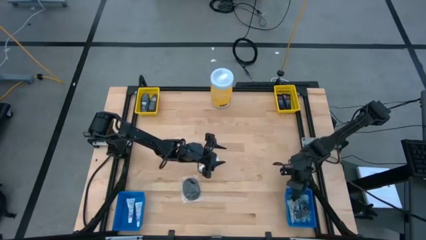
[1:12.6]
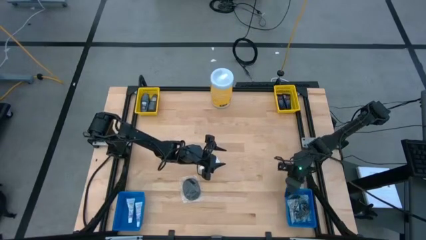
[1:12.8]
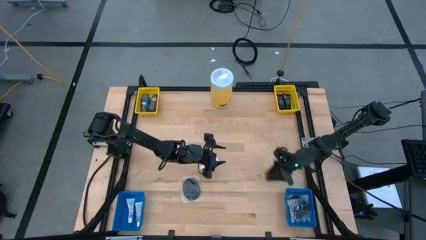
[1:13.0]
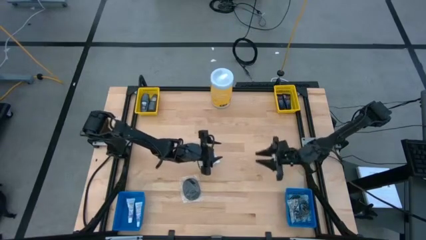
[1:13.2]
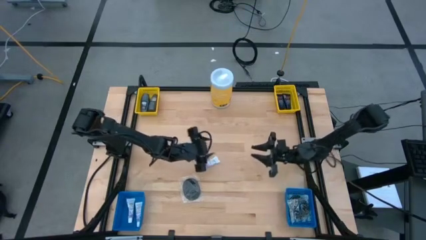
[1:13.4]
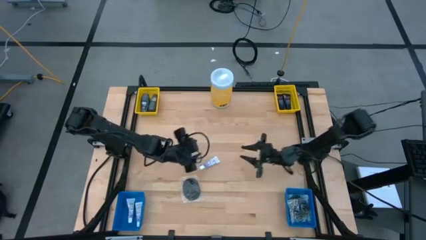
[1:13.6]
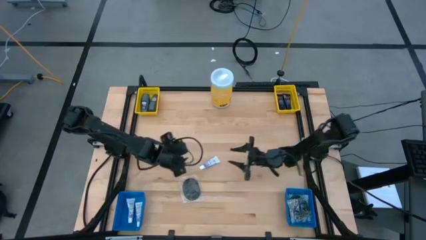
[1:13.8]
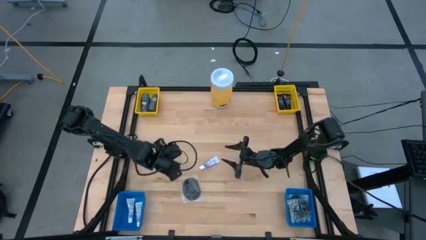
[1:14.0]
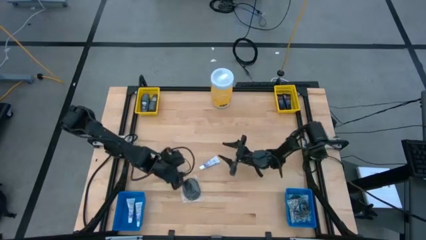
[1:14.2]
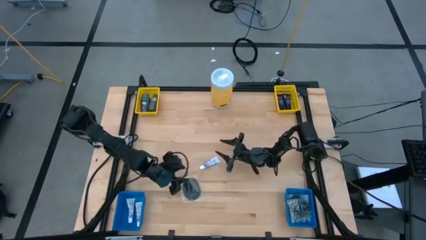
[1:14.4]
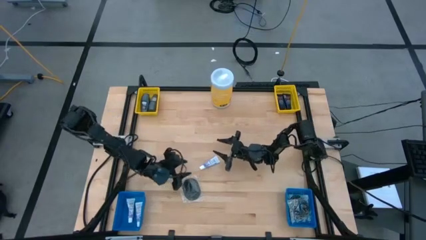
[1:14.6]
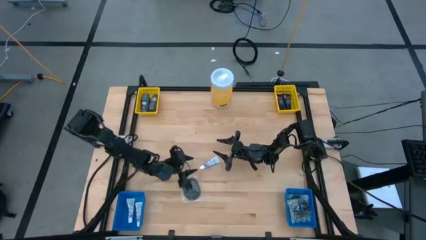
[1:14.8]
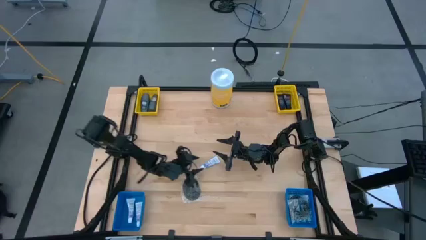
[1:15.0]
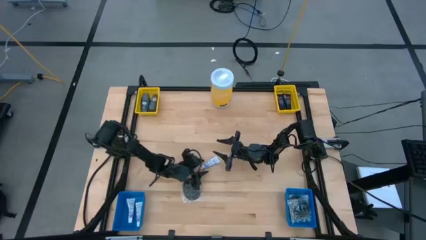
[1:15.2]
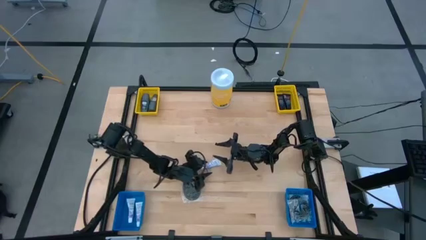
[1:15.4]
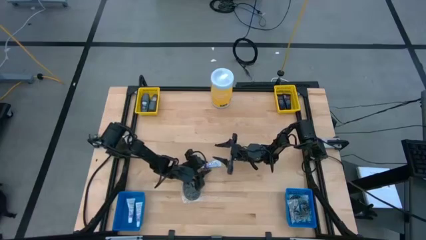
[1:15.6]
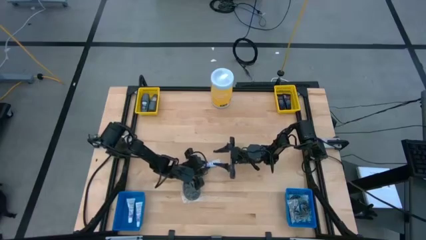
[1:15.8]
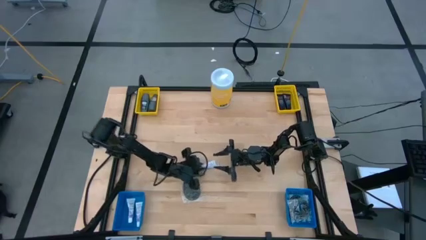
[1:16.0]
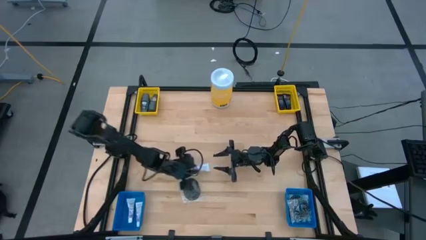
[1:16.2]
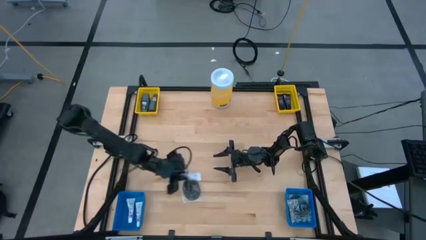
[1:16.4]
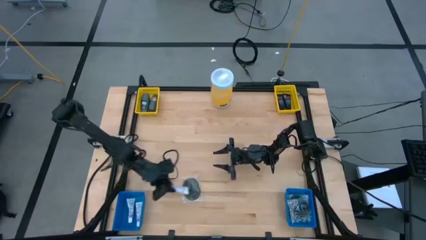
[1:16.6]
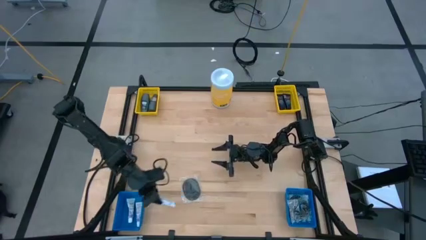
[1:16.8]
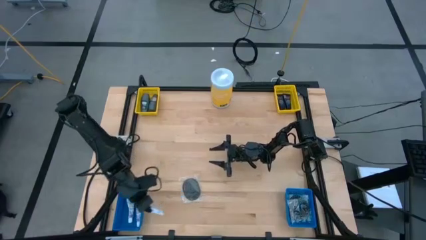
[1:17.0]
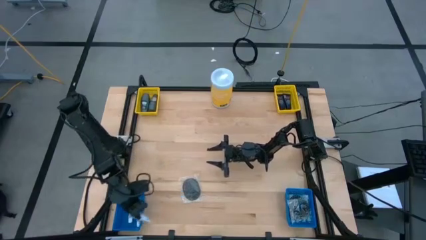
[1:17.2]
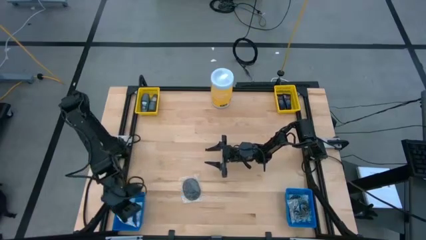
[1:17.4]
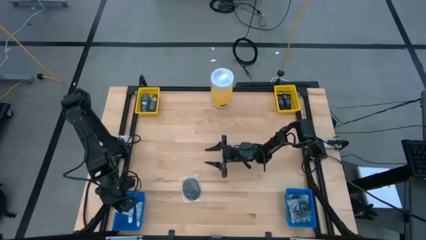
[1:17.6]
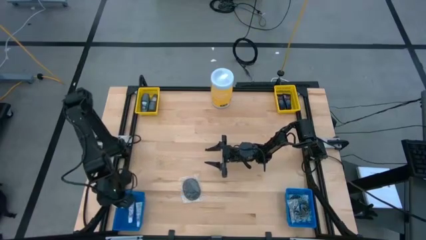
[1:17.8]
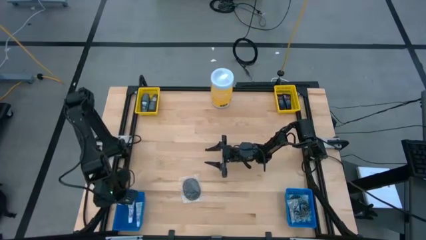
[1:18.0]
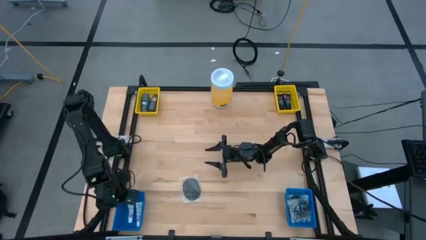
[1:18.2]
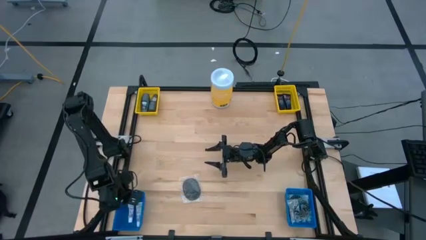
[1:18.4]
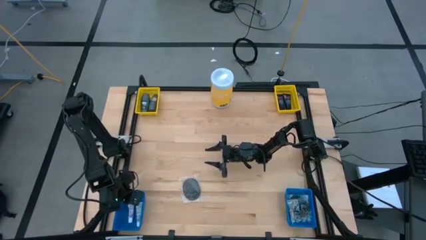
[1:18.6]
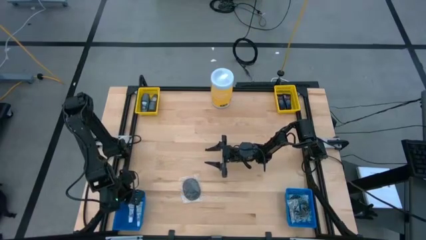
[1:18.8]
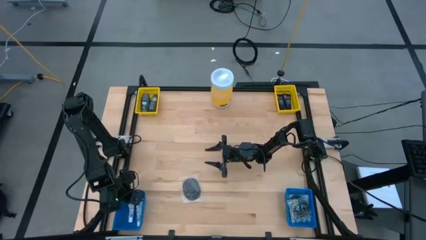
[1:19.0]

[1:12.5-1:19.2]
Task: Pick & Place Travel size toiletries
Put the white toothpaste into the left blue bin

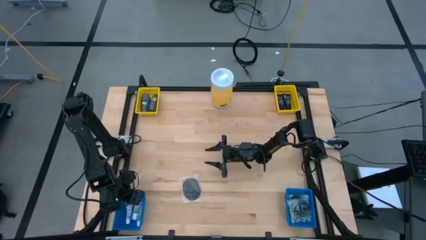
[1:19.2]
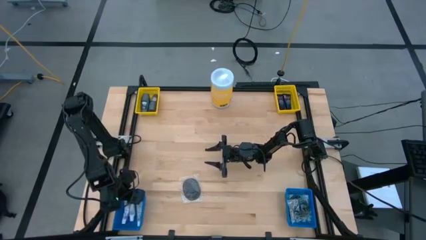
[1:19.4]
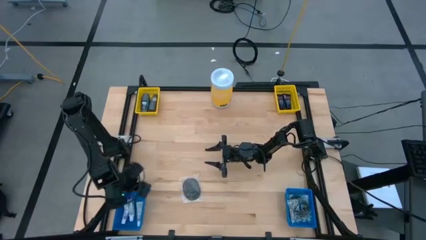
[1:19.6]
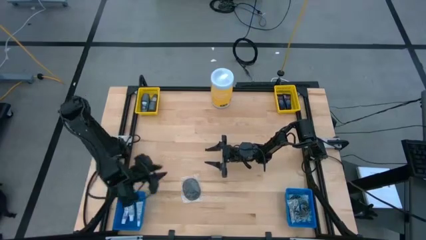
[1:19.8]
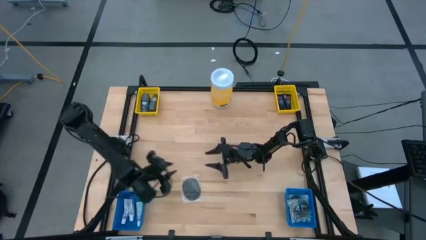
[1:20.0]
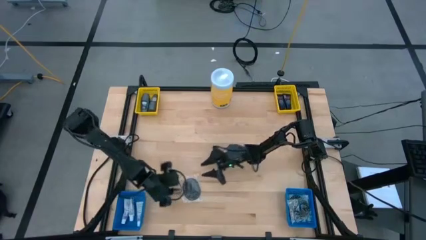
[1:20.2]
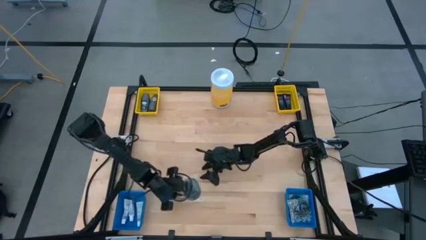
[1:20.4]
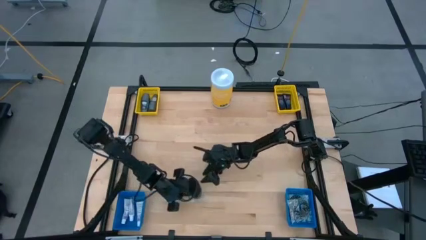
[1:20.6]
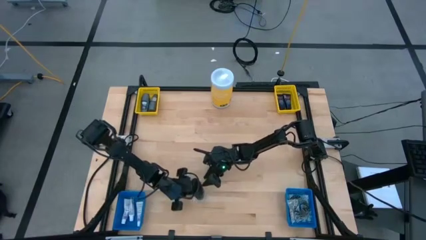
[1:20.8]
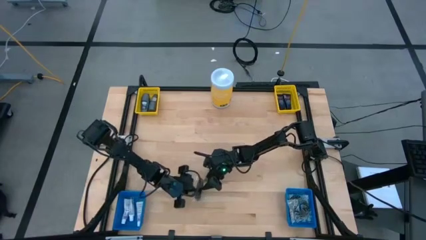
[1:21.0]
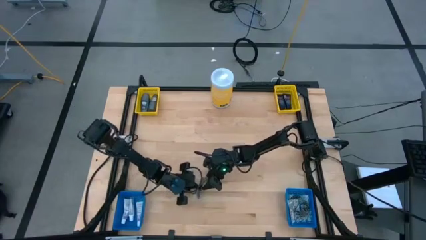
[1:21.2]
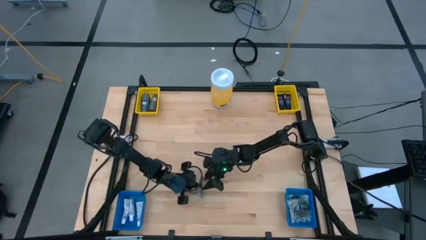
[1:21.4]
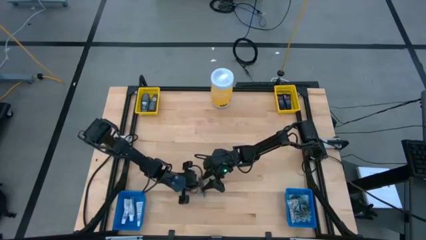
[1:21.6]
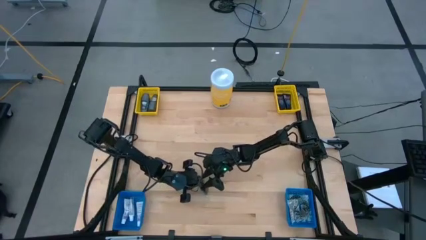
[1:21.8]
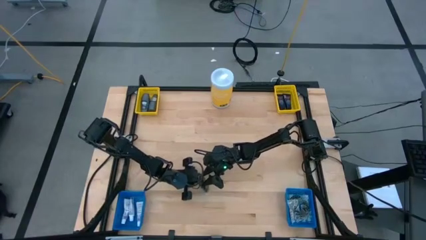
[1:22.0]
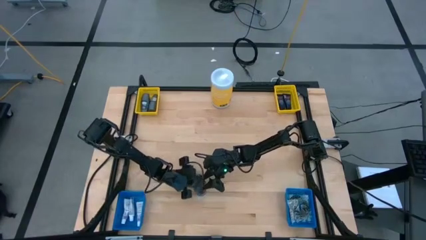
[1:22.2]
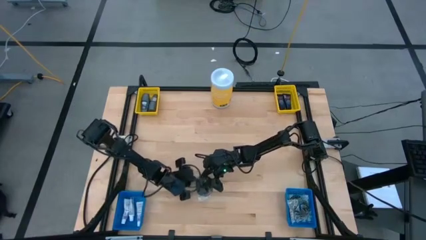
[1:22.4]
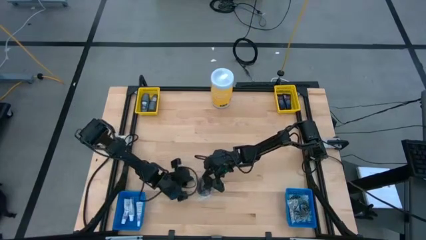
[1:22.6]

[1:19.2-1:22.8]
Put the black hairbrush into the right blue bin

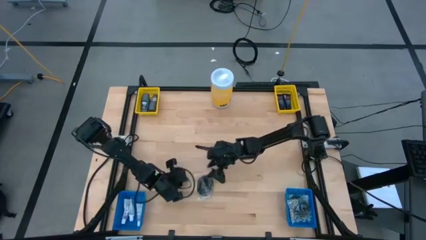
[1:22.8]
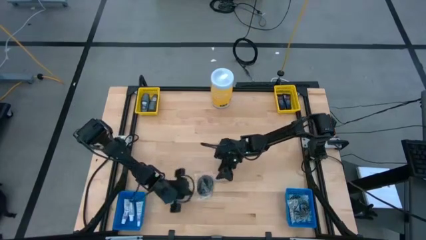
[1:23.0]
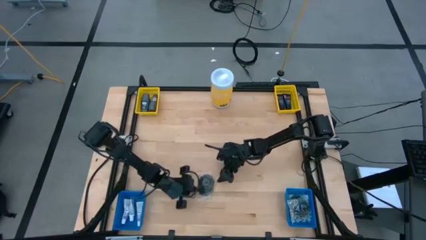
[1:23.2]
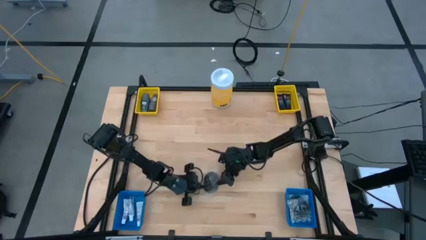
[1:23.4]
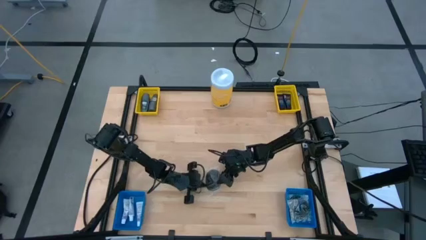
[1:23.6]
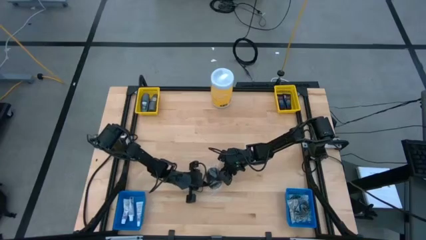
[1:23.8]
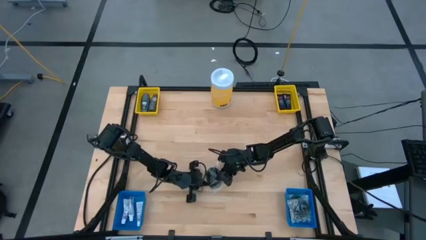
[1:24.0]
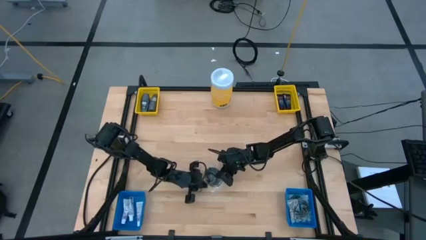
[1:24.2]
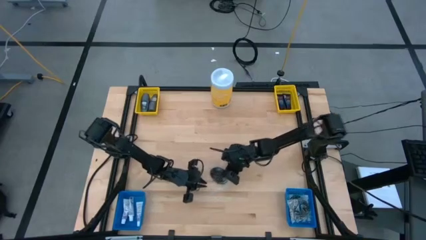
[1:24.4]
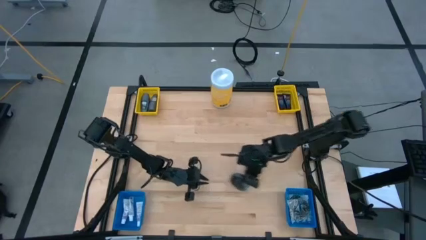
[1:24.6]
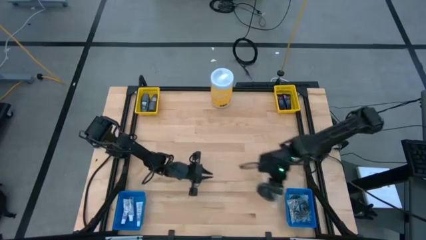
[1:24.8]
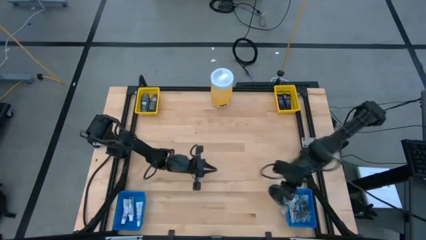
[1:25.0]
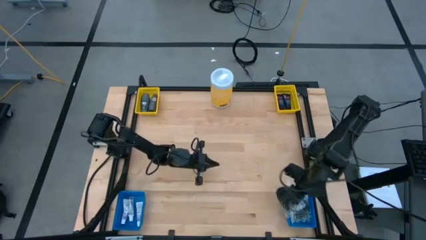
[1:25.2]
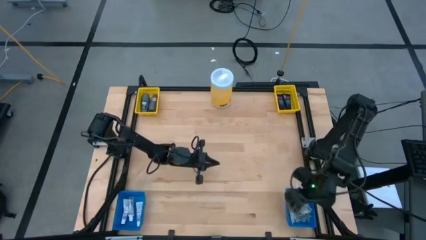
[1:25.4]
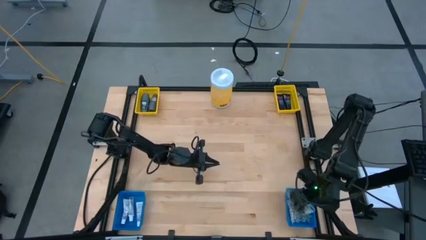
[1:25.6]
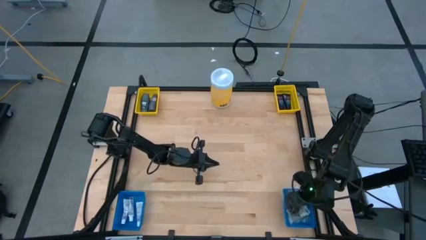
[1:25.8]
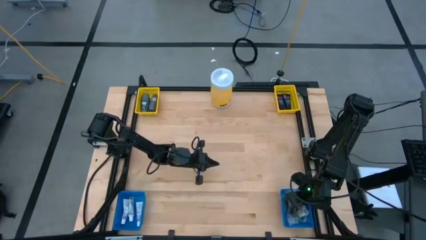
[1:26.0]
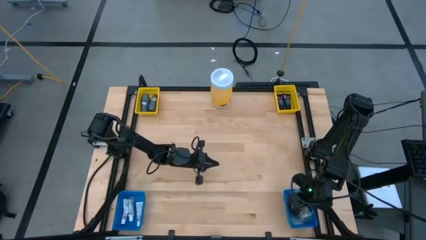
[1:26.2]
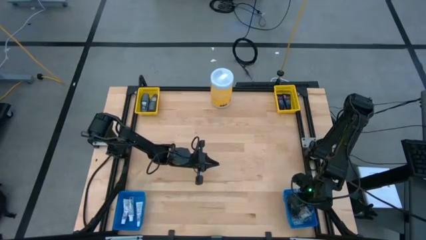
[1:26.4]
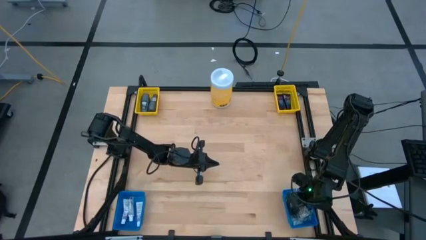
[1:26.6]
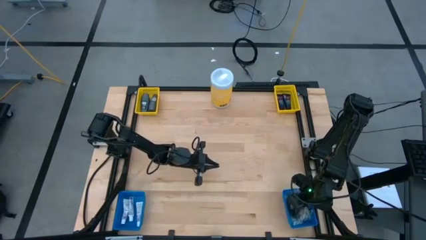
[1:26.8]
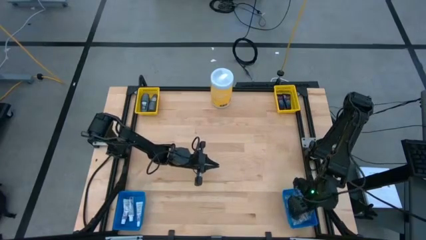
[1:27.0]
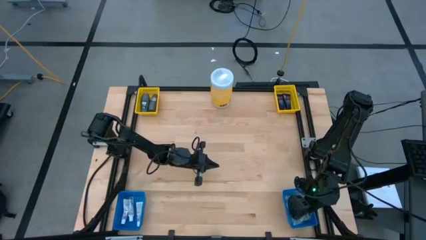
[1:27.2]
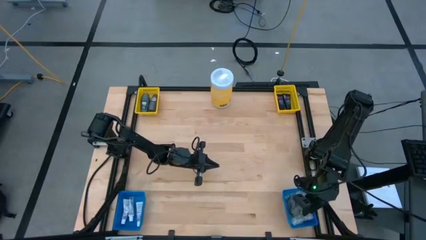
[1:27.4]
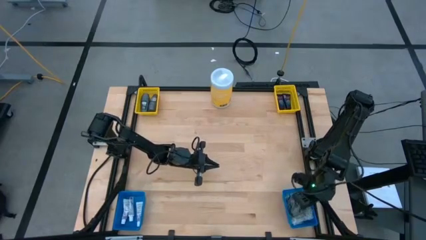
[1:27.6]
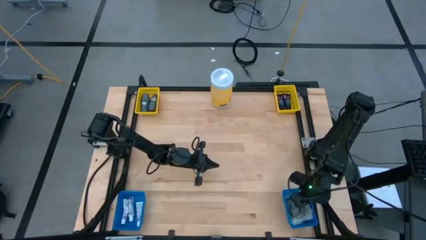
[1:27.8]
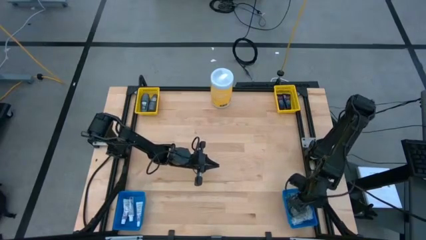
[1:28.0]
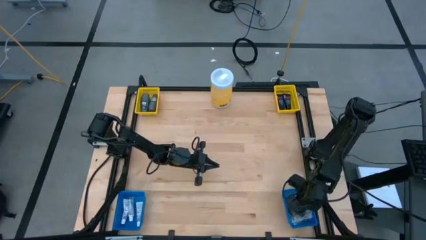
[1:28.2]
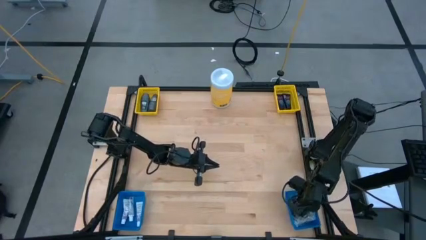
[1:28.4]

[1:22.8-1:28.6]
Put the black hairbrush into the right blue bin
